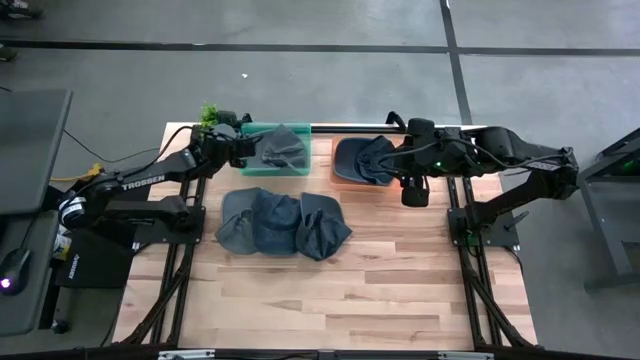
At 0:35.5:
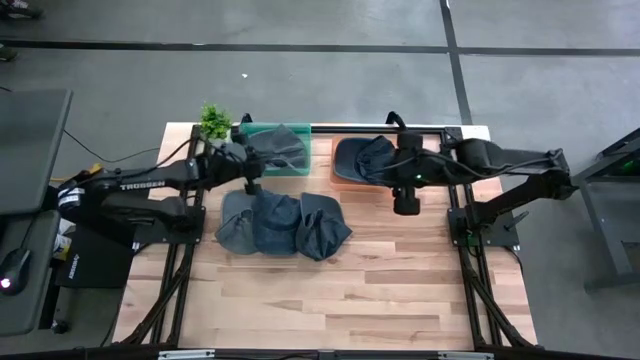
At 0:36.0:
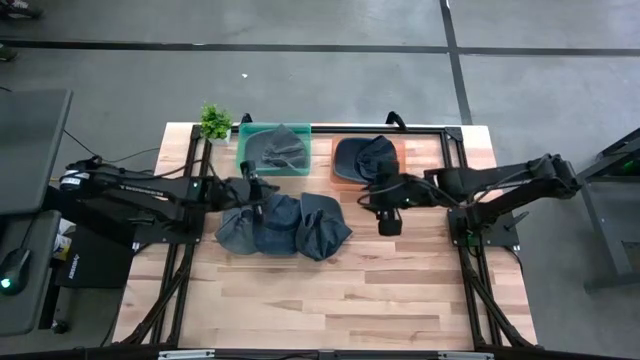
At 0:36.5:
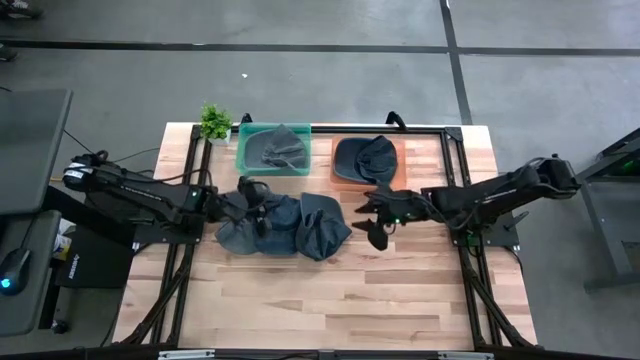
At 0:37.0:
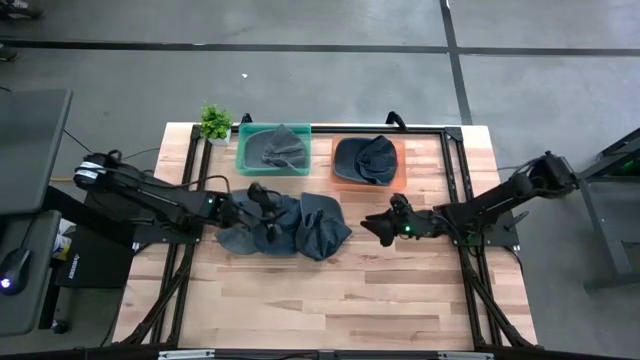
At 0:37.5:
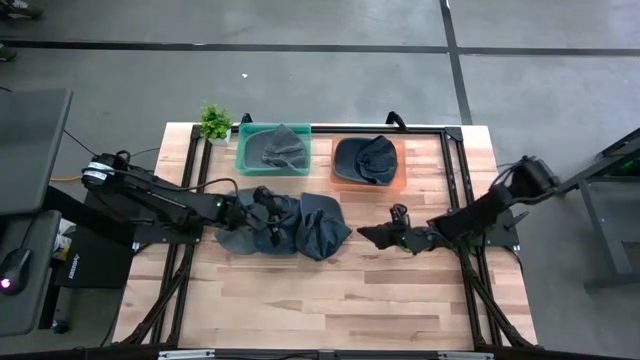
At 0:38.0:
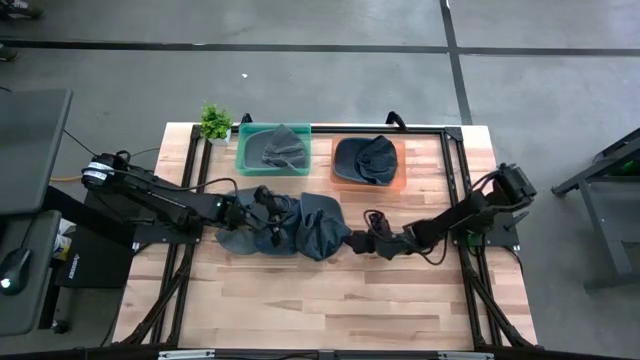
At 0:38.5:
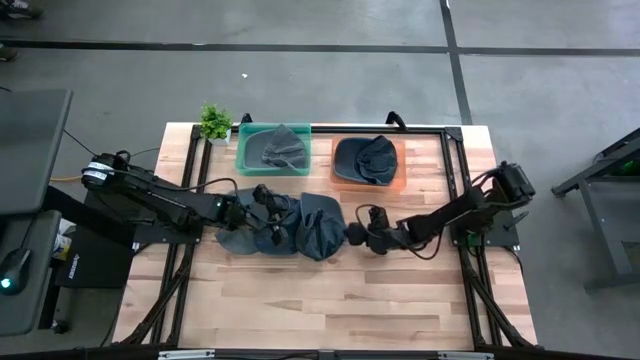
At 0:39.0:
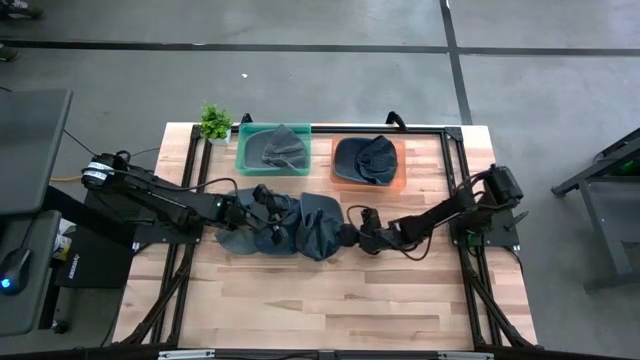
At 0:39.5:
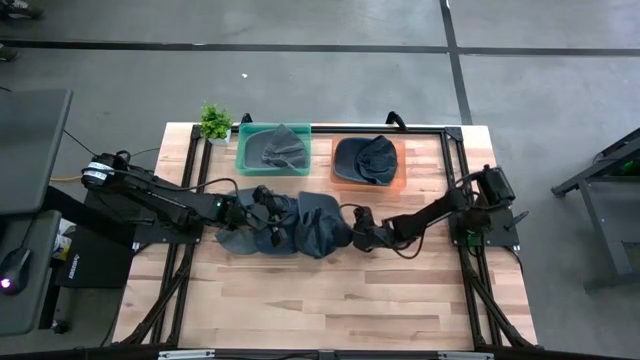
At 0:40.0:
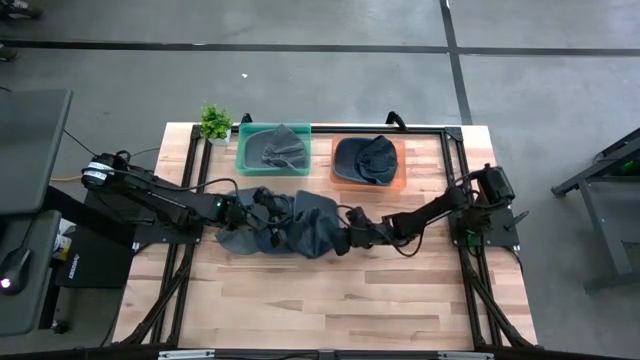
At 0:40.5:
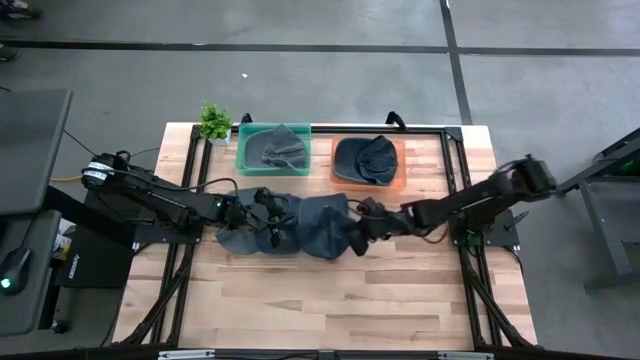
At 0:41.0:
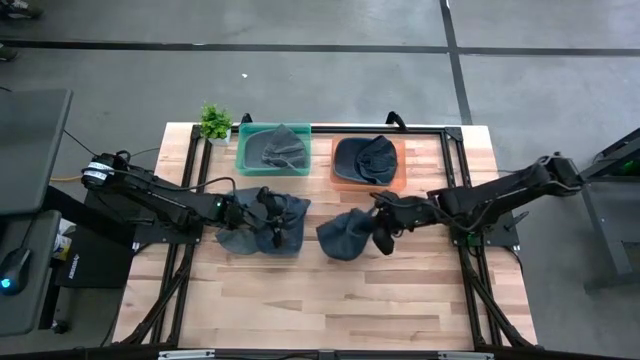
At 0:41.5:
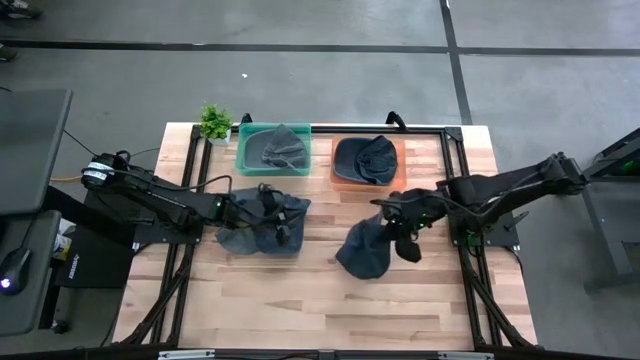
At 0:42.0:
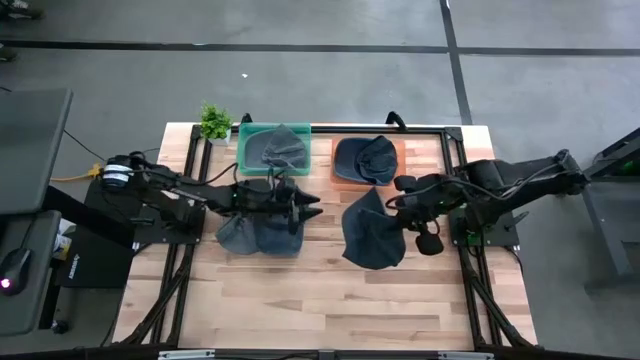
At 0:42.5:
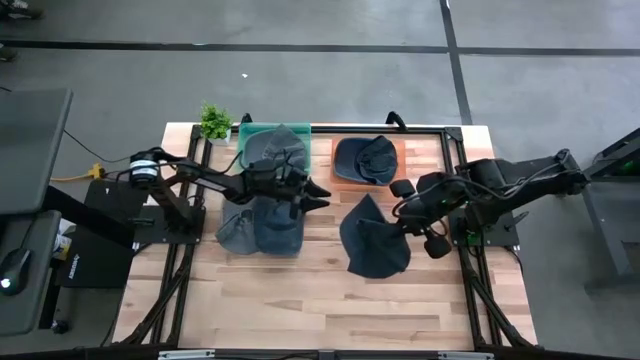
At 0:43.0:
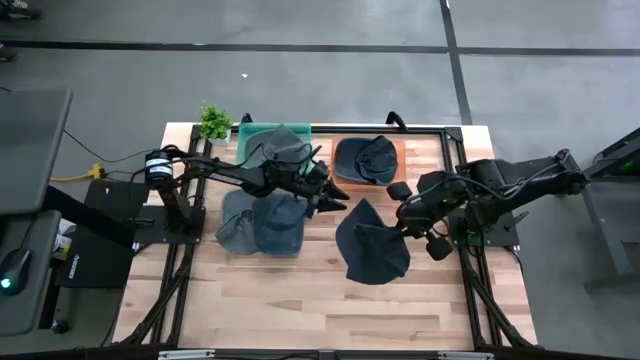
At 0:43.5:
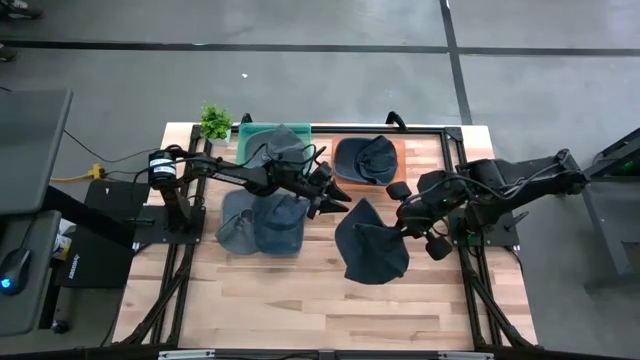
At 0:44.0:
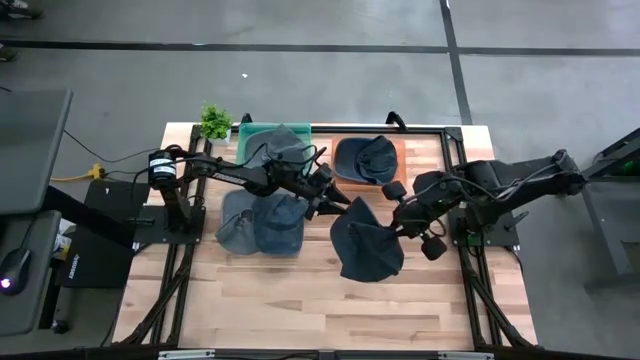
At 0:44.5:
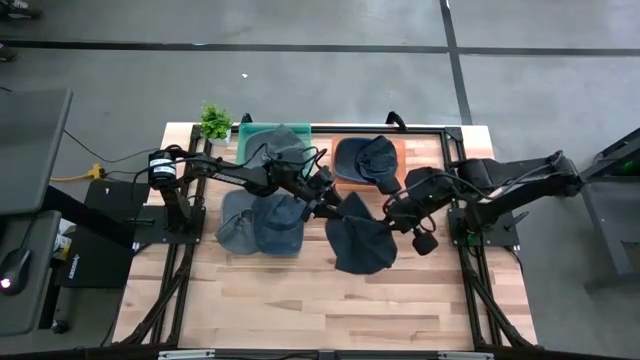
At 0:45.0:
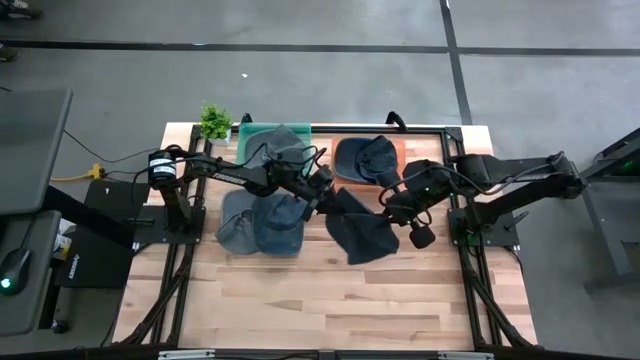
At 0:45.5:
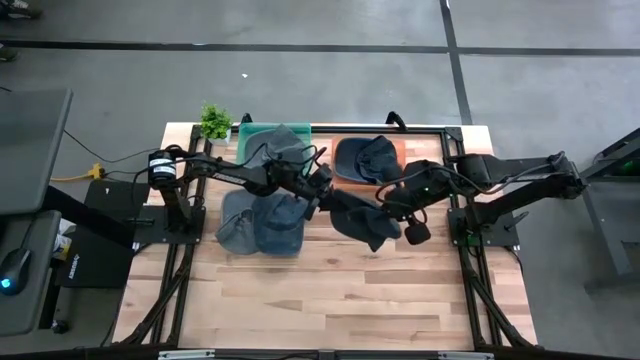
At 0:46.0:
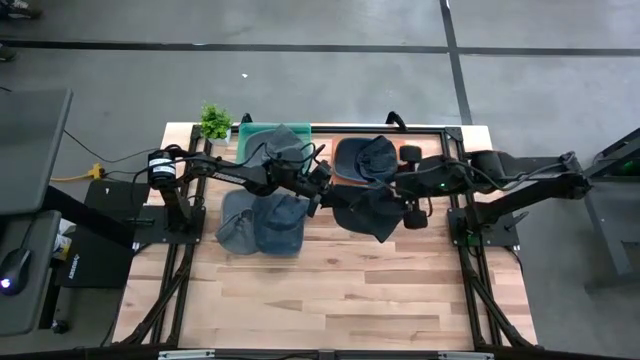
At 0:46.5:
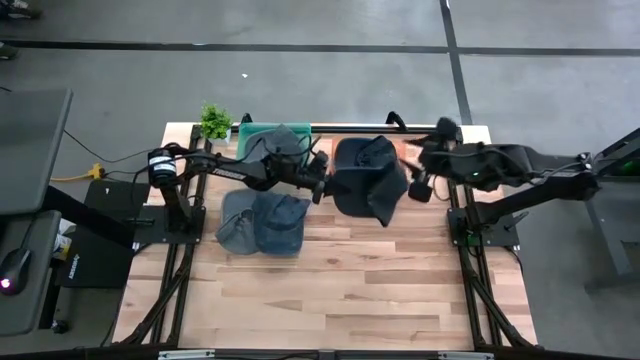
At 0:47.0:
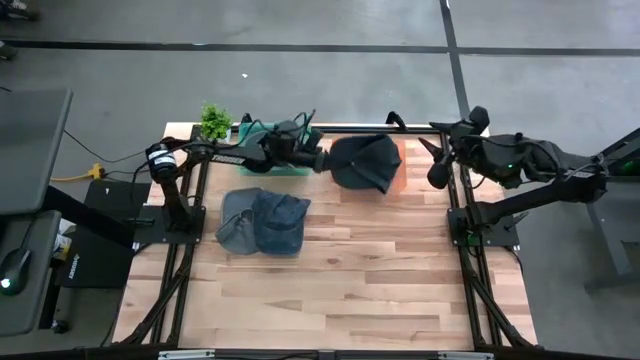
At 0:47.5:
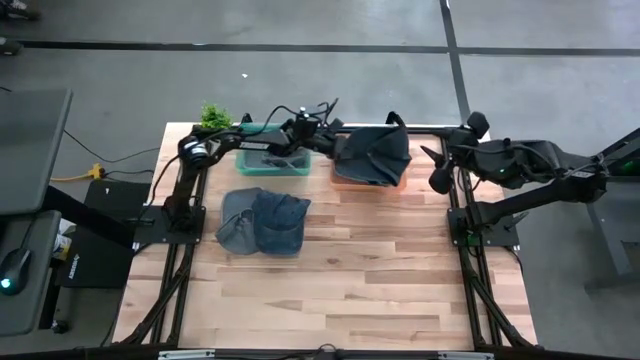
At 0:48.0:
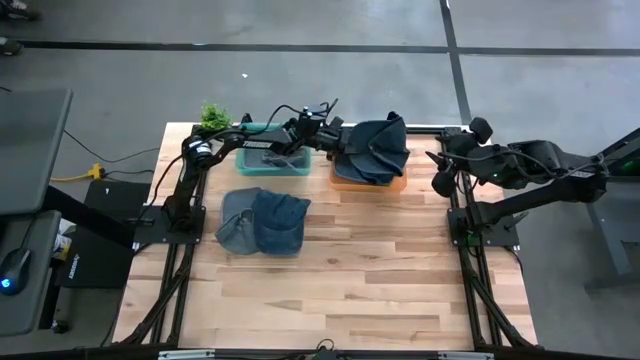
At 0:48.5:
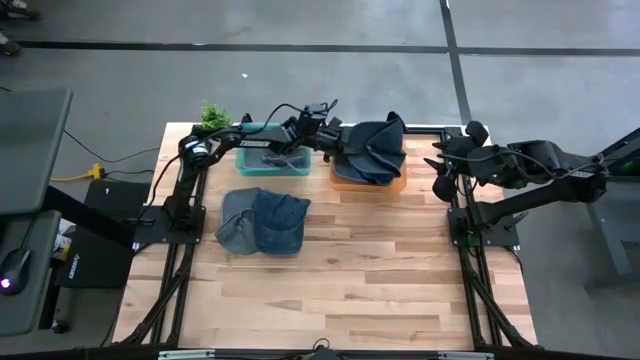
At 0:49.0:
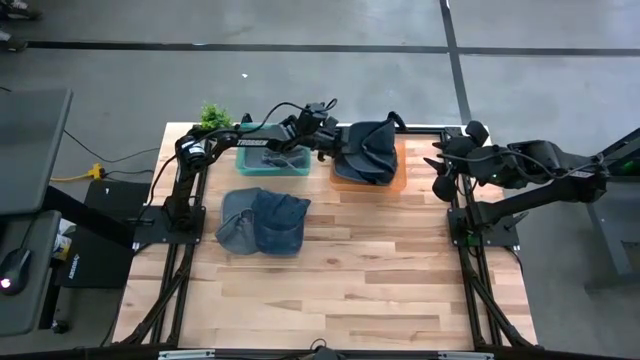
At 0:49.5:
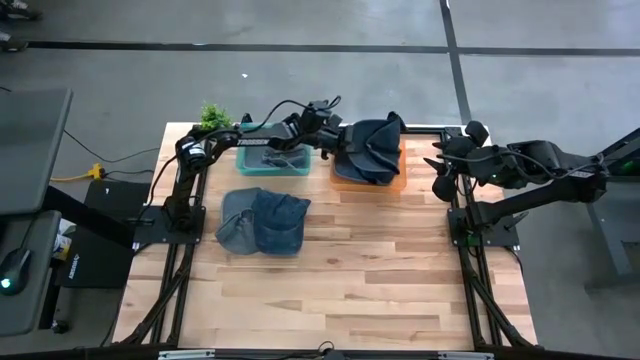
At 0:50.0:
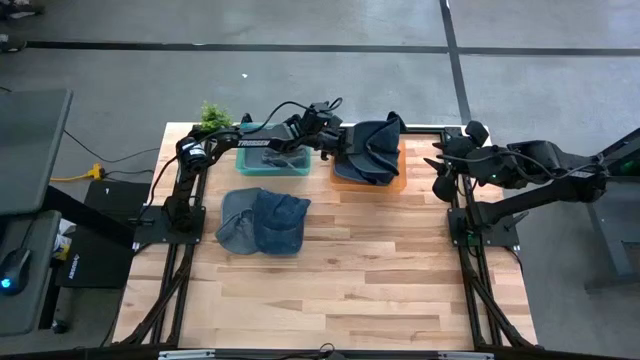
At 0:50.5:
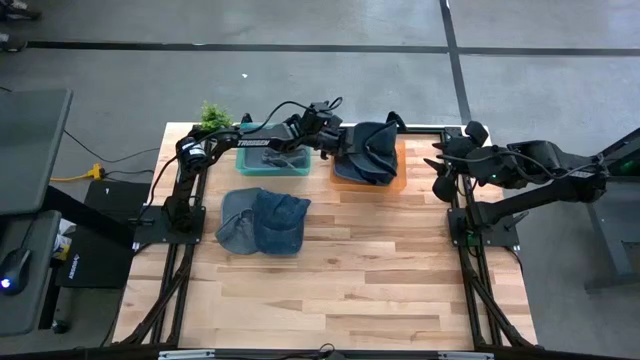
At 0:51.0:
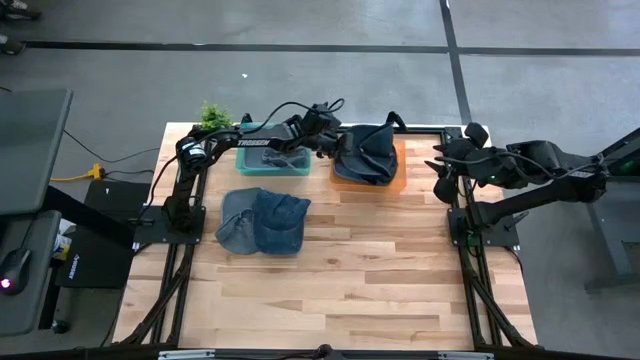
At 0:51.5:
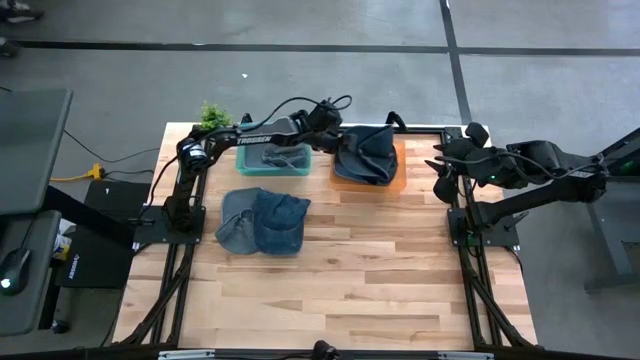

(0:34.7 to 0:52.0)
Task: Pick & Place hat
Put the right blue cap into the orange bin

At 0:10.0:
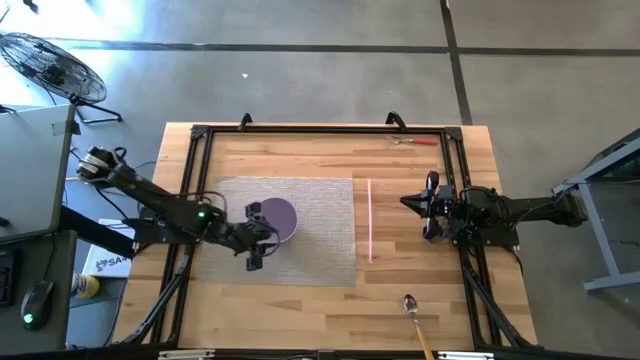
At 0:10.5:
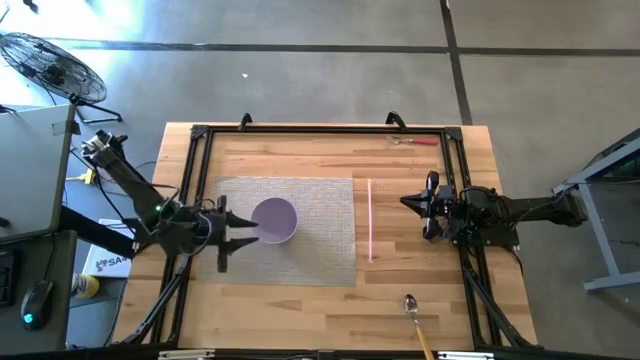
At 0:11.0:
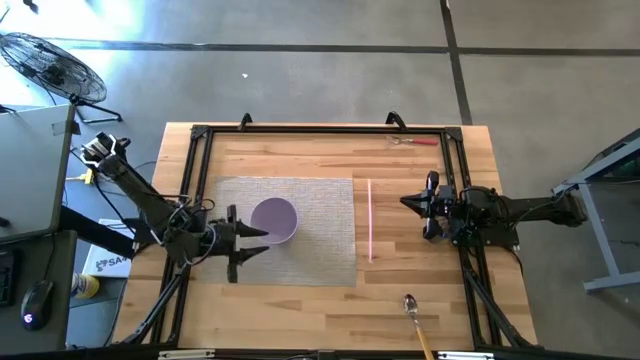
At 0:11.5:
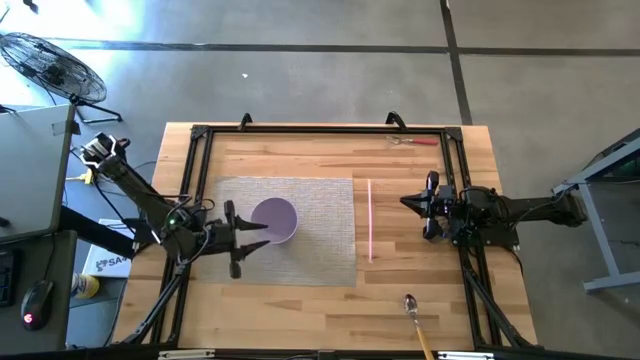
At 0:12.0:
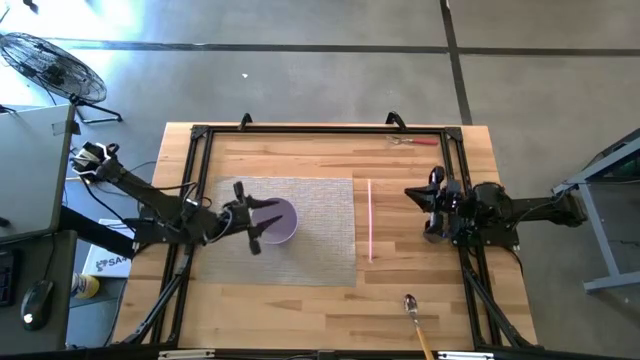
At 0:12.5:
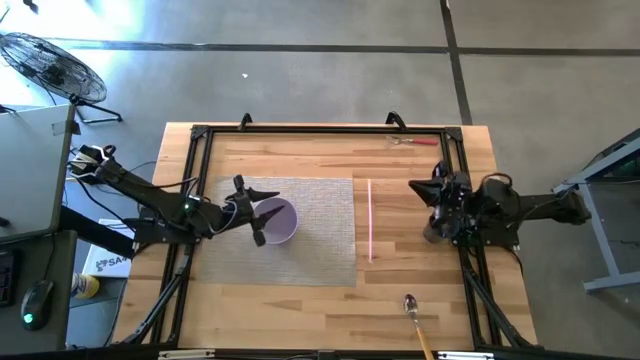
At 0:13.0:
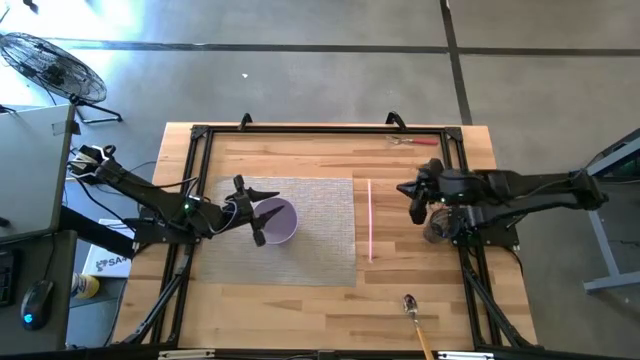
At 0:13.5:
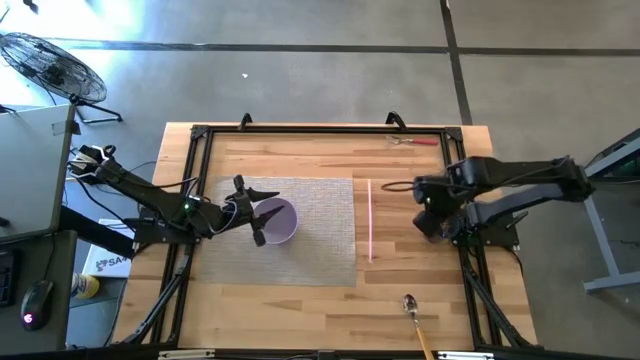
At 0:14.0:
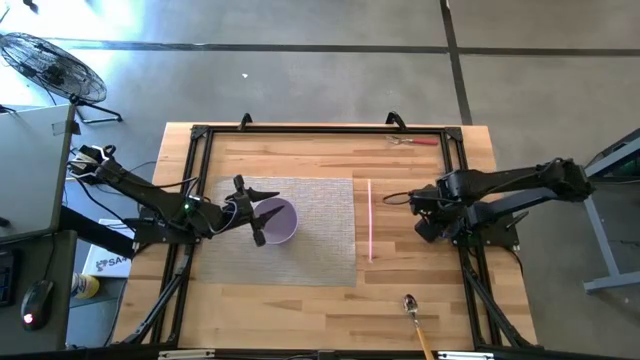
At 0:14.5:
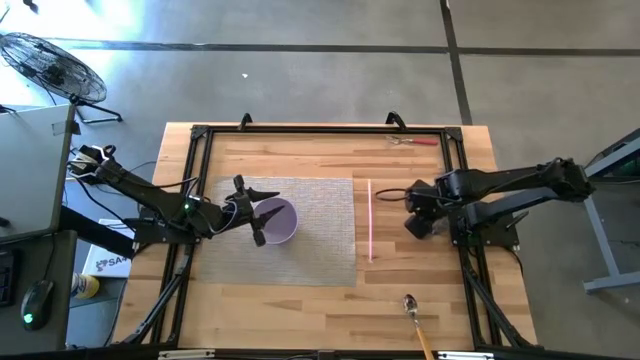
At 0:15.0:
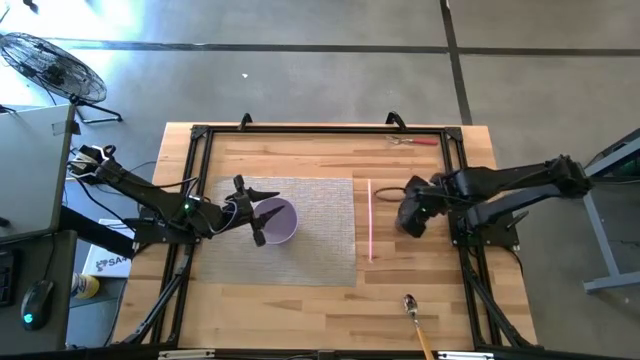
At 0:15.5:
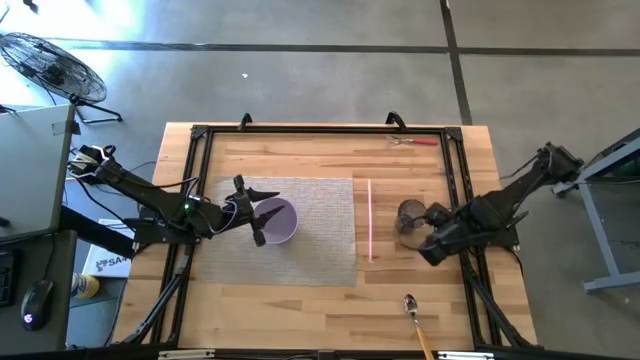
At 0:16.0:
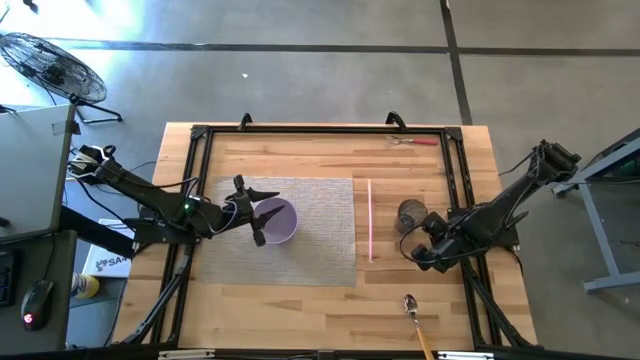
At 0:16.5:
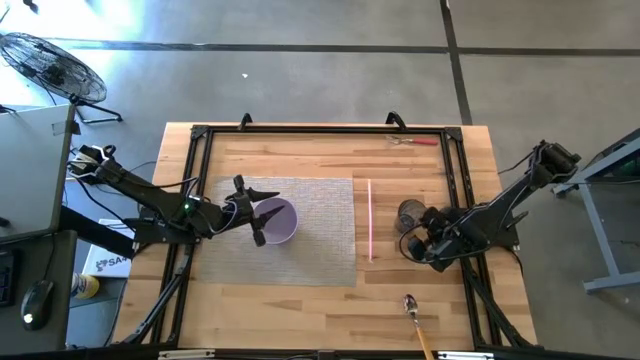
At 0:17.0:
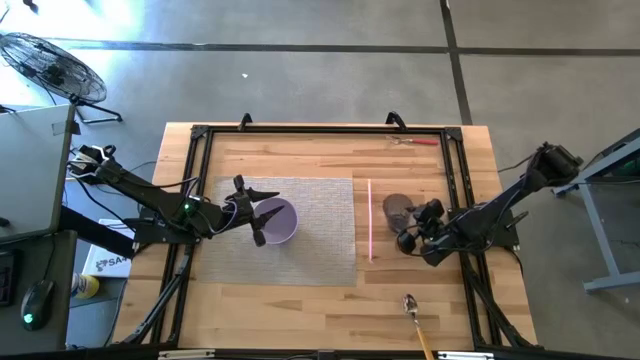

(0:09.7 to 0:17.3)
Task: Pick & Place Utensil
Put the blue glass on the gray mat to the top right of the purple bowl
